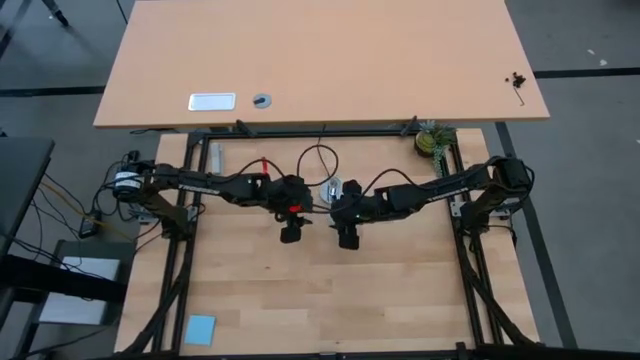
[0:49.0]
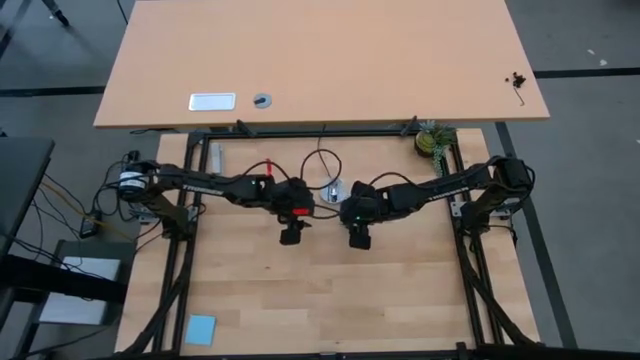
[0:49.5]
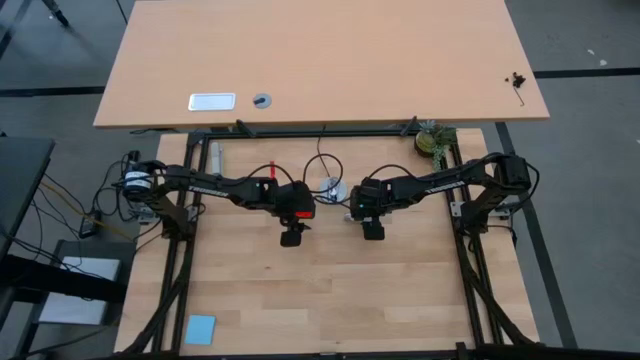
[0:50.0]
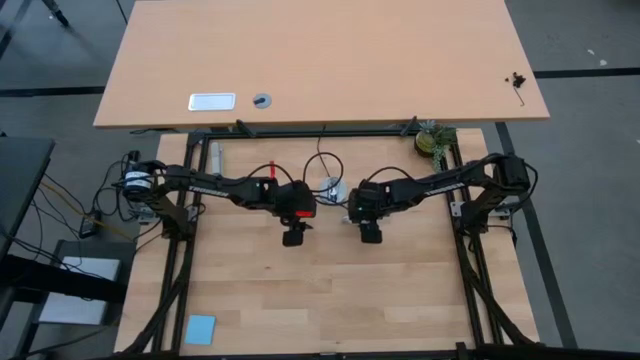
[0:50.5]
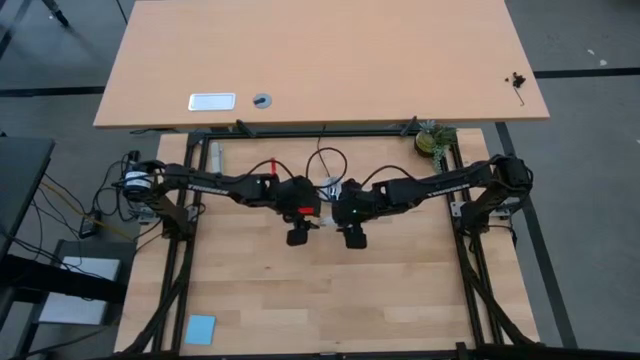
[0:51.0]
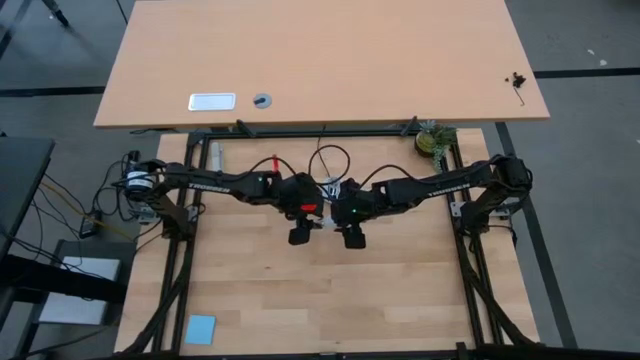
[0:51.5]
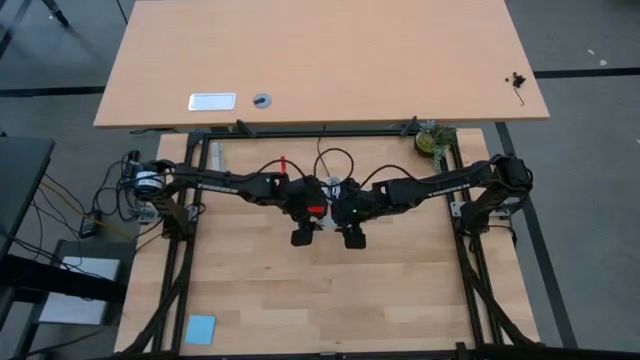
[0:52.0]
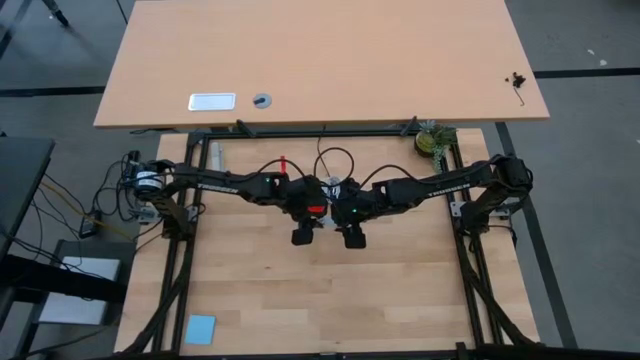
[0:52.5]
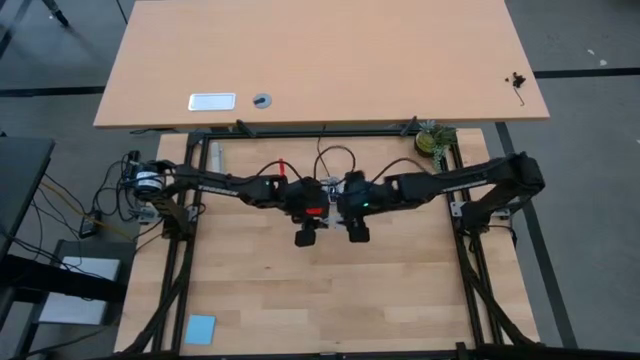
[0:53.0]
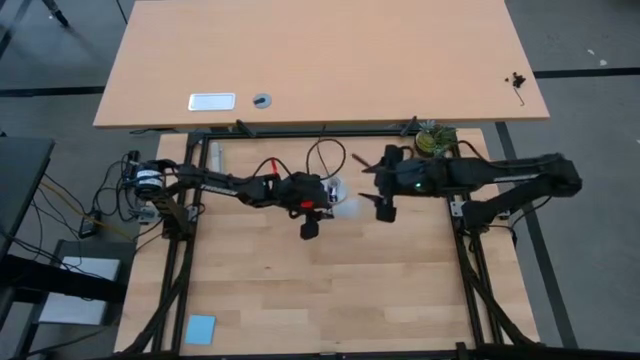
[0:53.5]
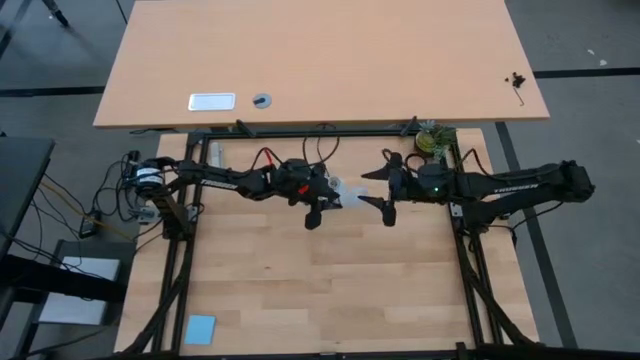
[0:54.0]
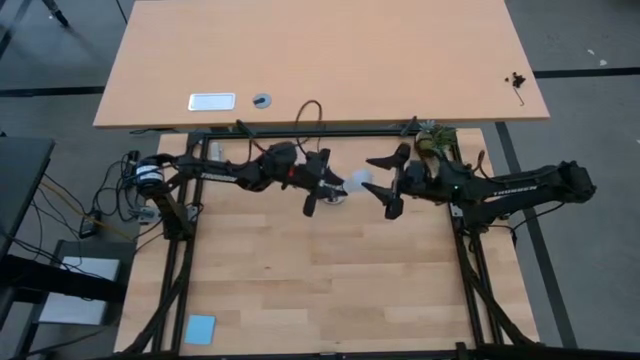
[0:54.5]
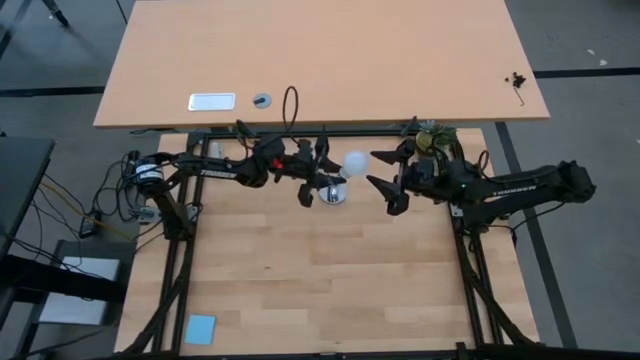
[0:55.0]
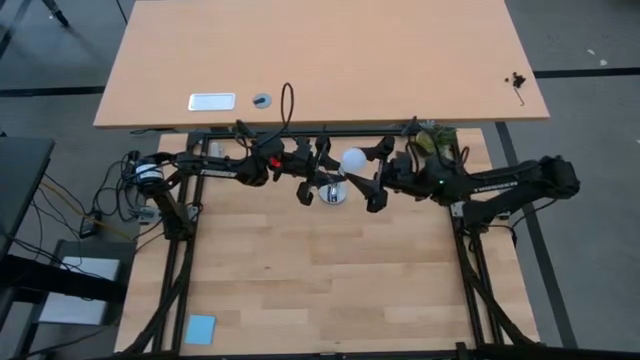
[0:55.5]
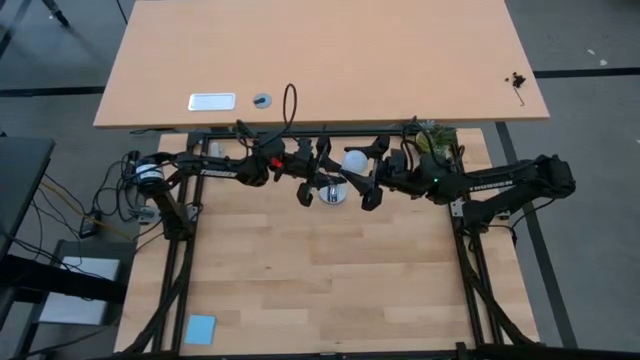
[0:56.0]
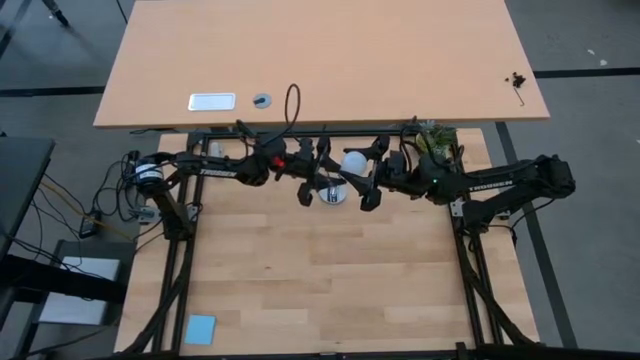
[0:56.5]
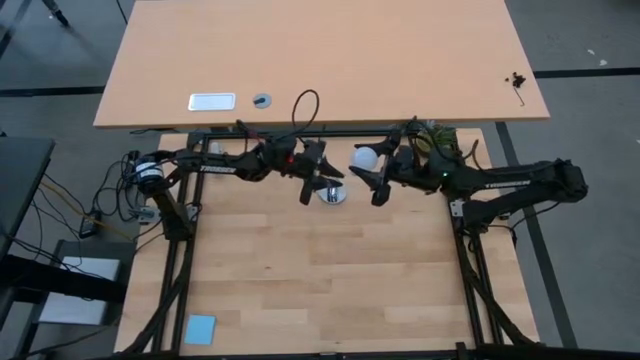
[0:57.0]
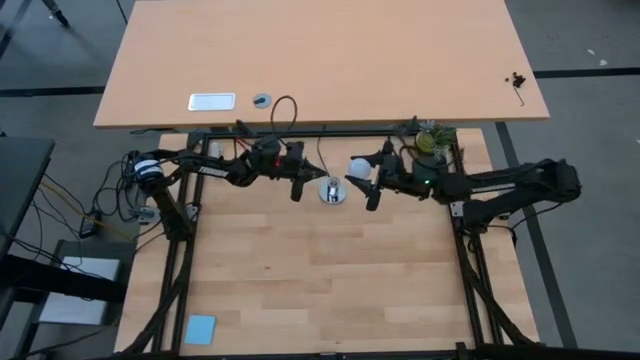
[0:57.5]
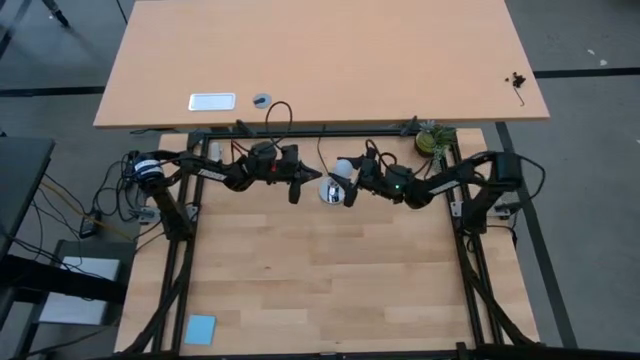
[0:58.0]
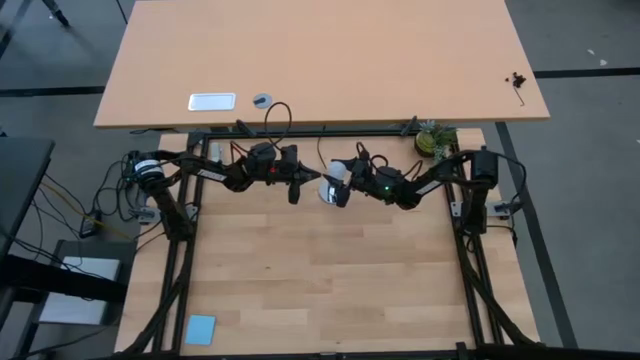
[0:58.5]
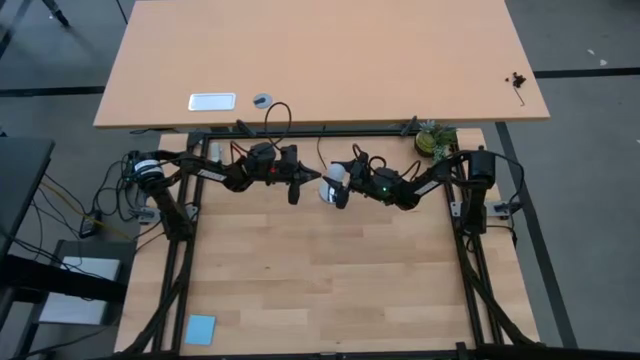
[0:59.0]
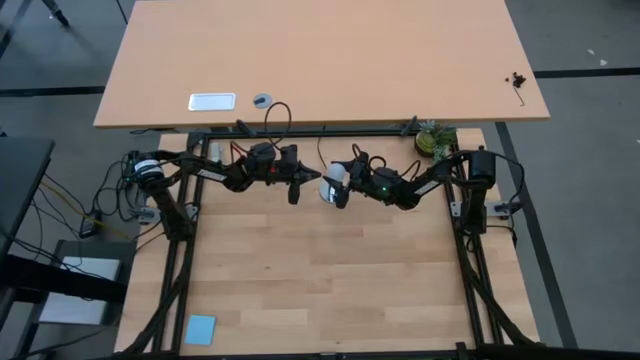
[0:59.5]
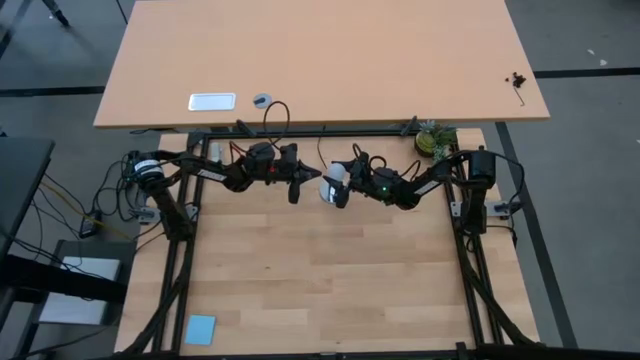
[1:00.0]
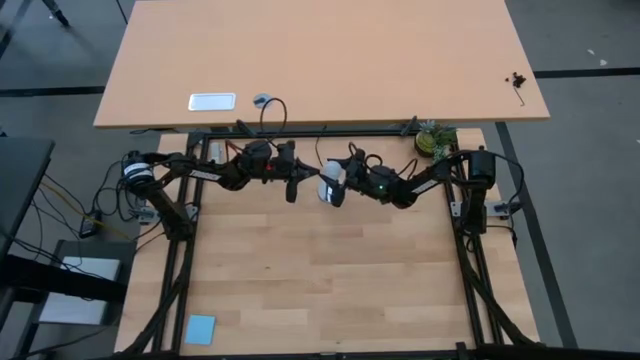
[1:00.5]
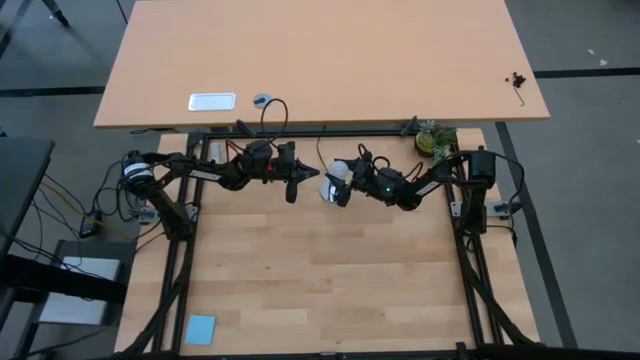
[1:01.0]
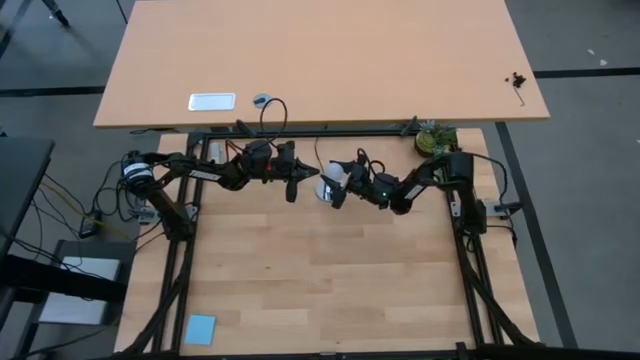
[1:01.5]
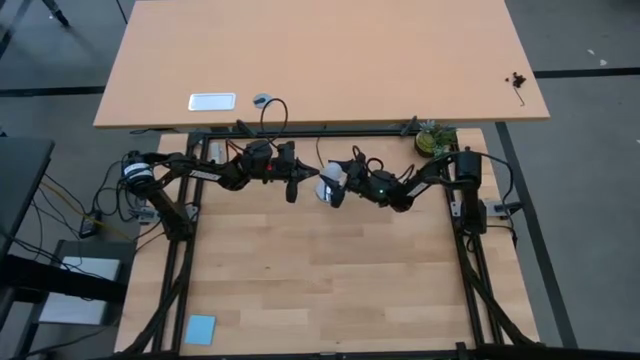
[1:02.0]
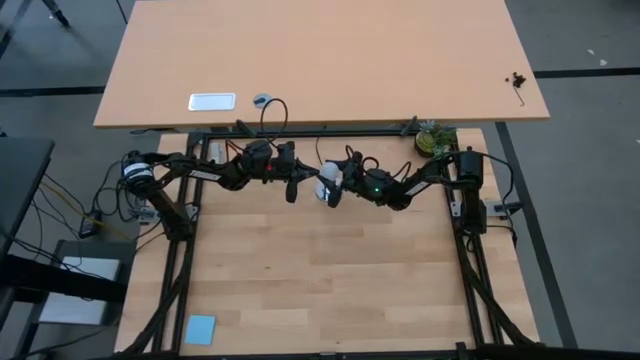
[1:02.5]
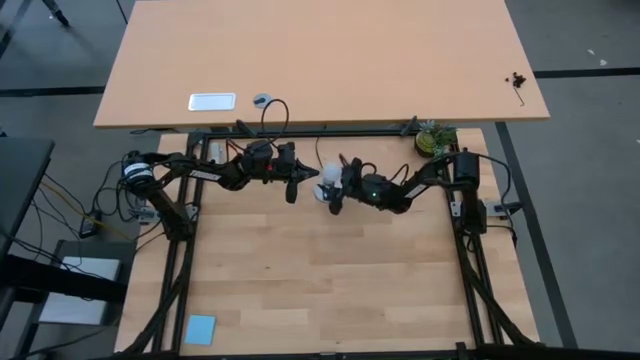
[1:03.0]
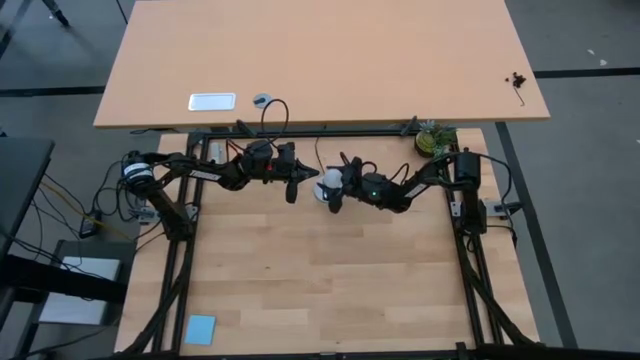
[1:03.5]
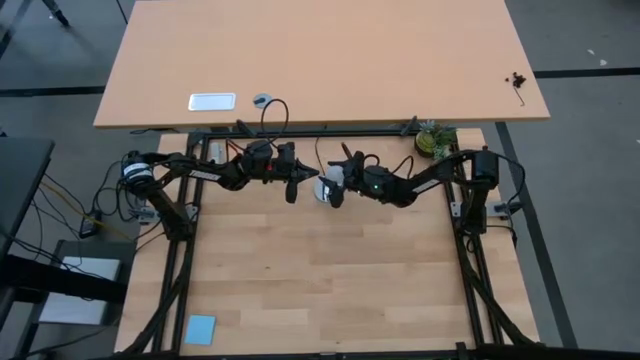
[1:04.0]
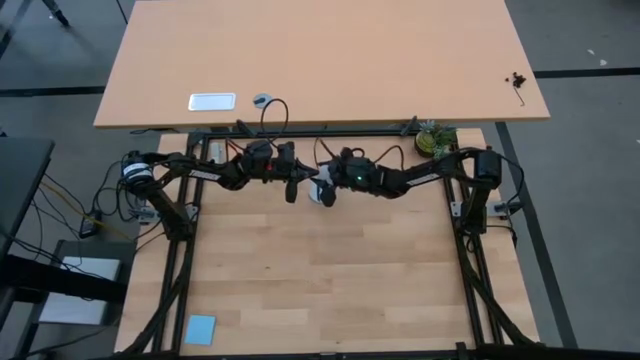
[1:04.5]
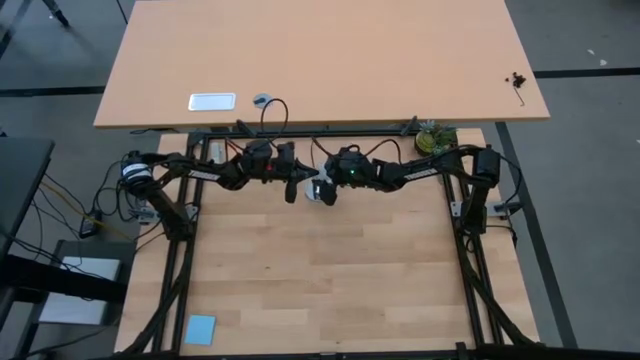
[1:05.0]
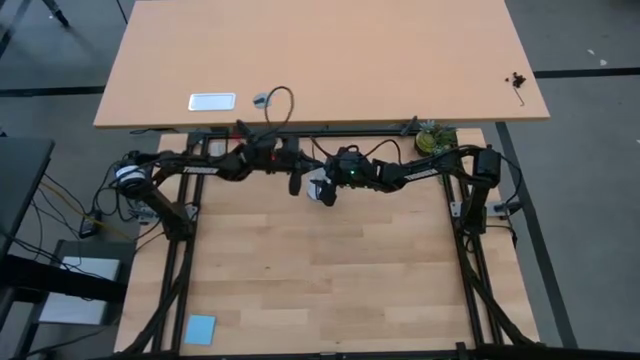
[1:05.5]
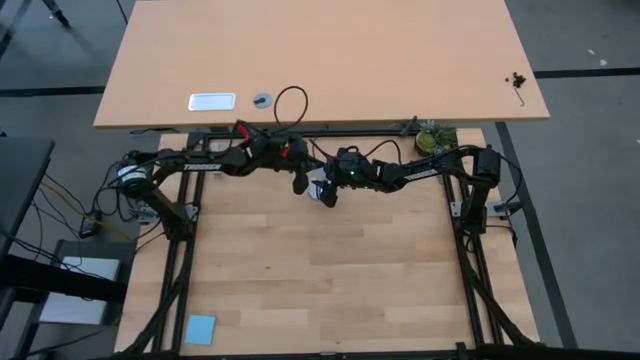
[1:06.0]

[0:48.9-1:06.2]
Task: Screw lightbulb
Insert the lightbulb into the lamp

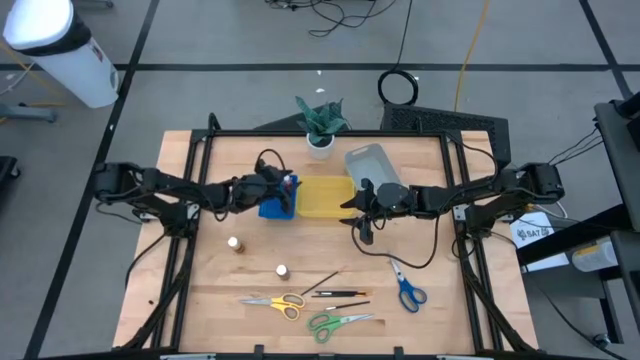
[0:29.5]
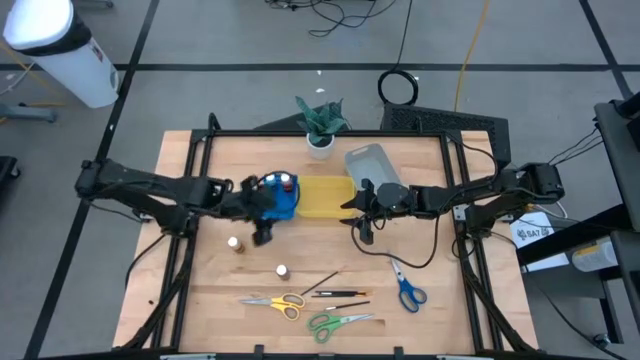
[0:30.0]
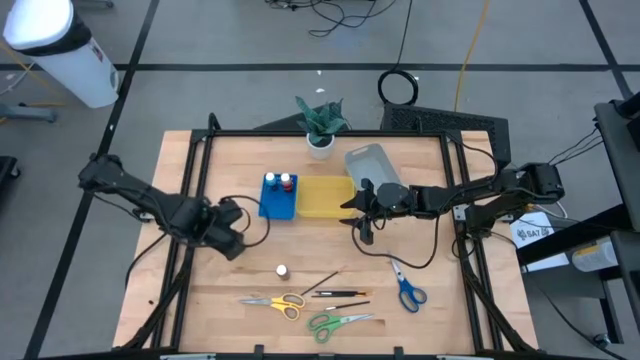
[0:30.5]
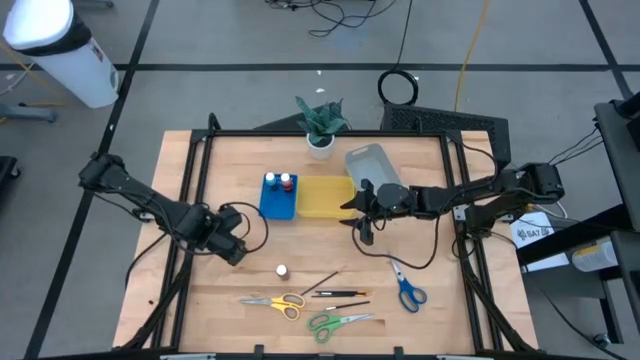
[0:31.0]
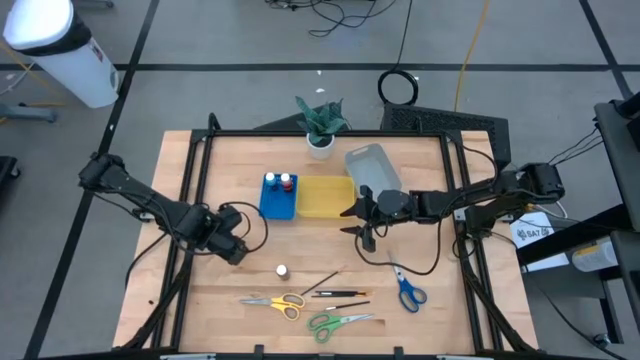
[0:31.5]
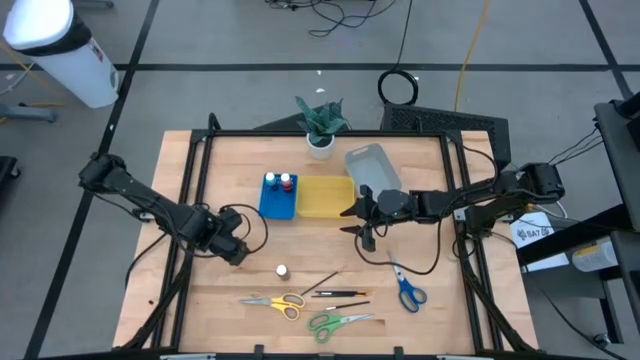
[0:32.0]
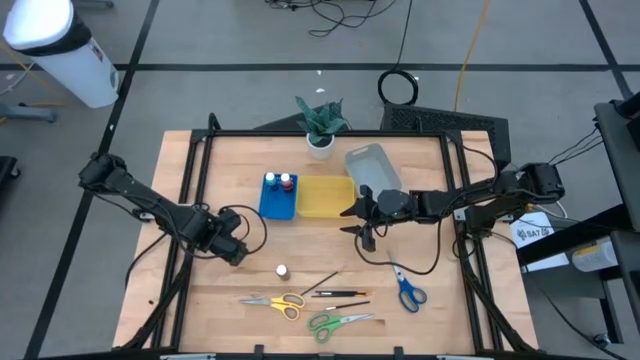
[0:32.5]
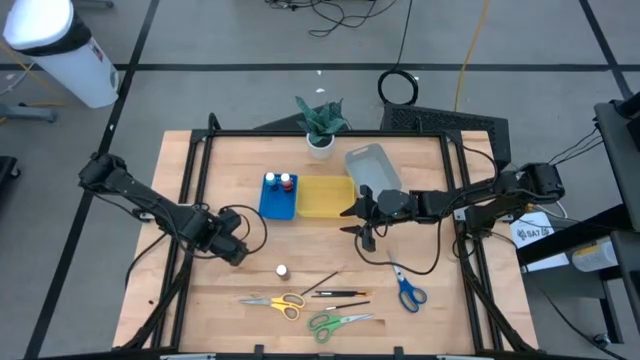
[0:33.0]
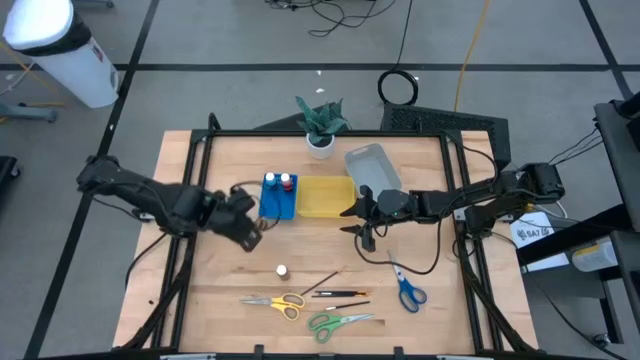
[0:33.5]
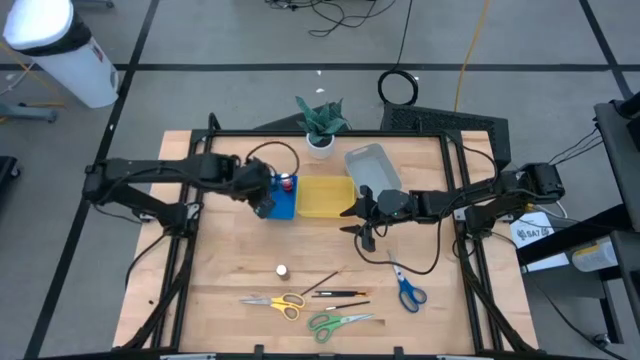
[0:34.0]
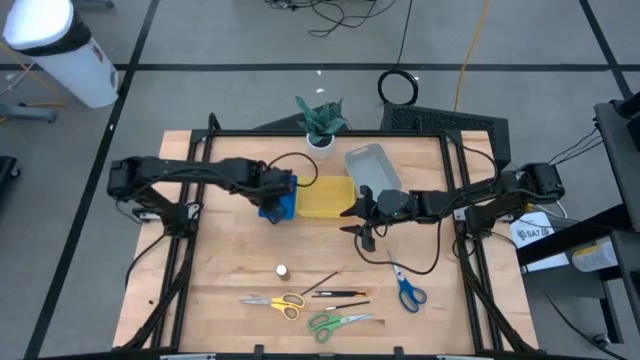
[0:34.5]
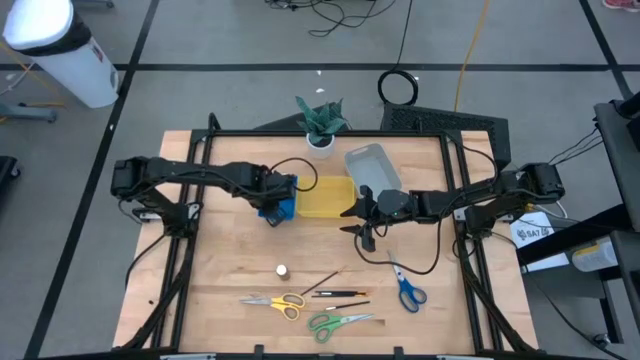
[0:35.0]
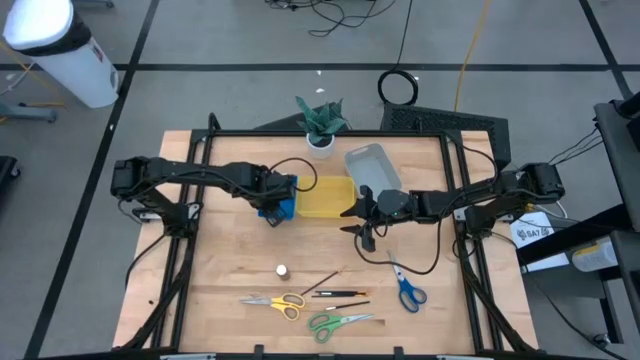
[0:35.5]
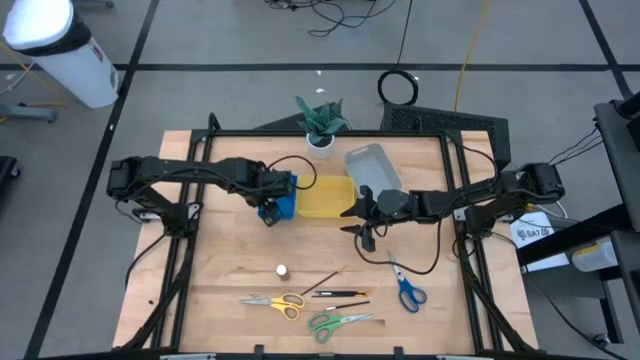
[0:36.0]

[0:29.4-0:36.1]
Task: Pick & Place Paint Supplies
Put the yellow paint bottle into the blue bin
